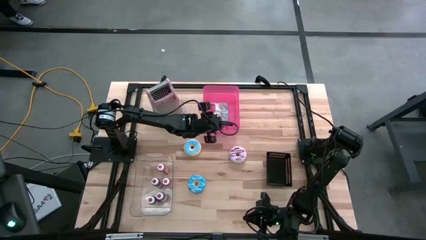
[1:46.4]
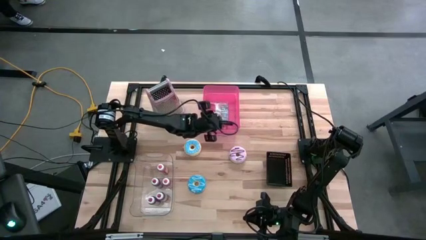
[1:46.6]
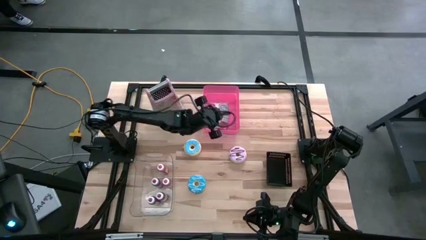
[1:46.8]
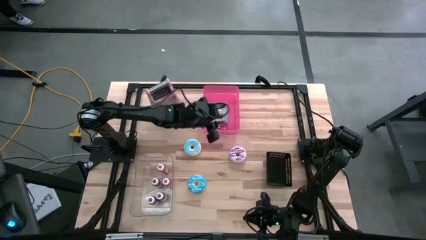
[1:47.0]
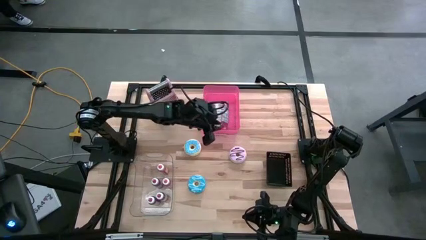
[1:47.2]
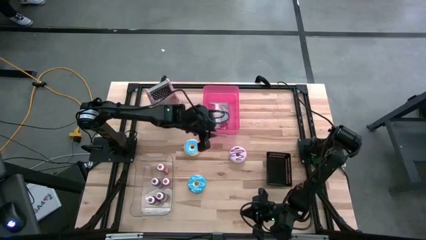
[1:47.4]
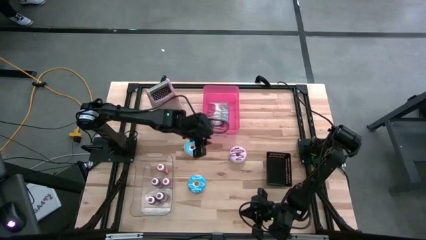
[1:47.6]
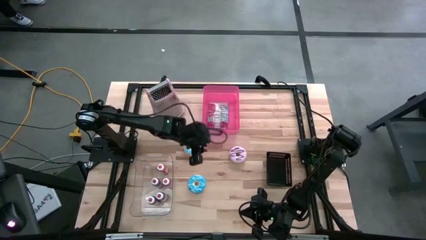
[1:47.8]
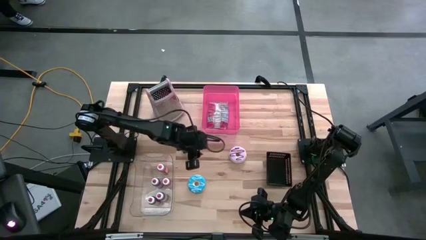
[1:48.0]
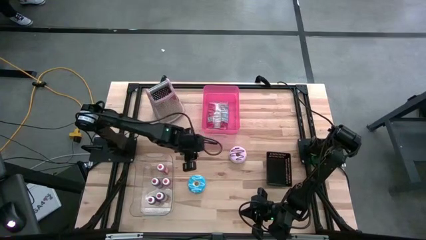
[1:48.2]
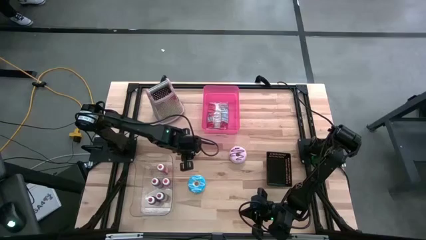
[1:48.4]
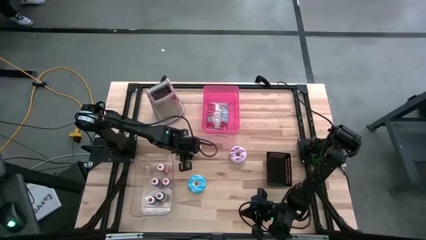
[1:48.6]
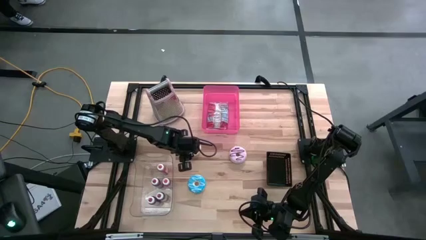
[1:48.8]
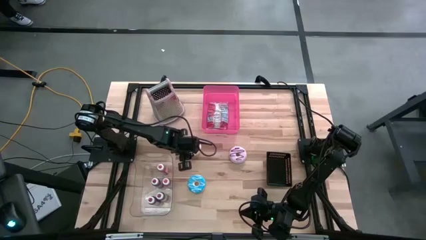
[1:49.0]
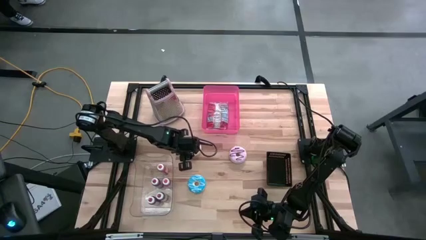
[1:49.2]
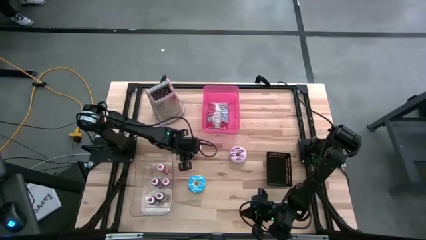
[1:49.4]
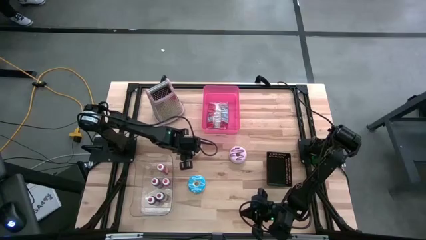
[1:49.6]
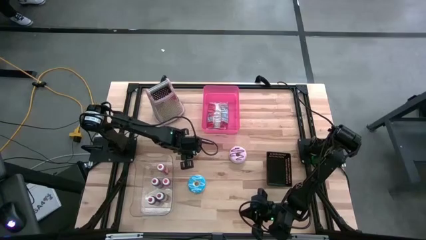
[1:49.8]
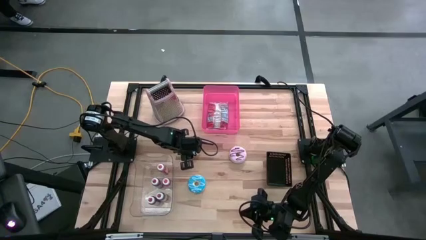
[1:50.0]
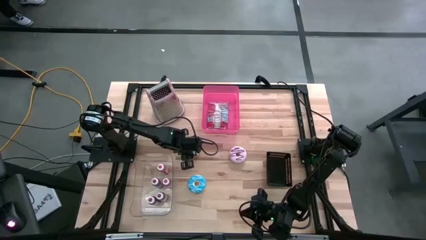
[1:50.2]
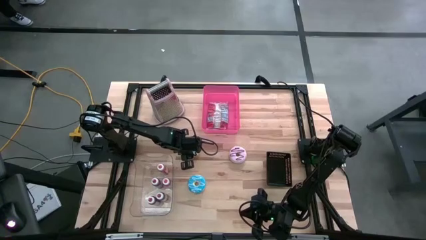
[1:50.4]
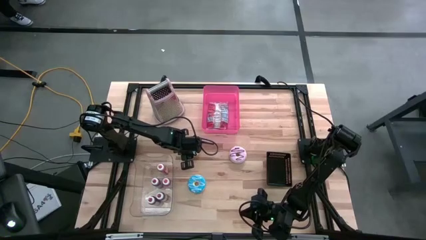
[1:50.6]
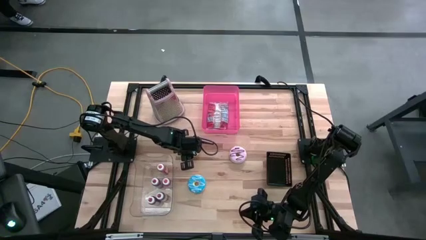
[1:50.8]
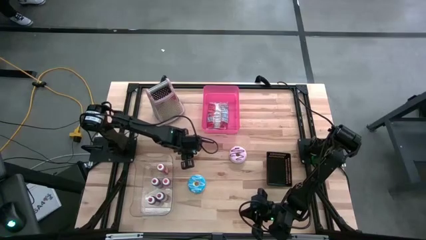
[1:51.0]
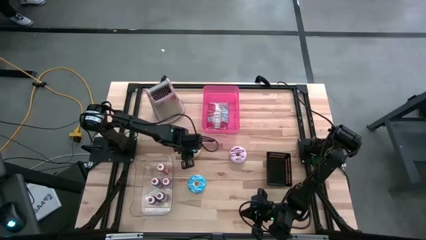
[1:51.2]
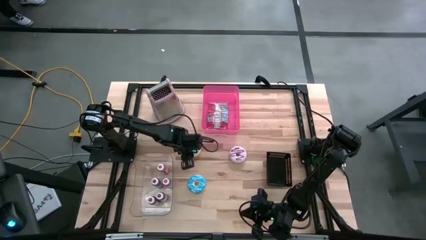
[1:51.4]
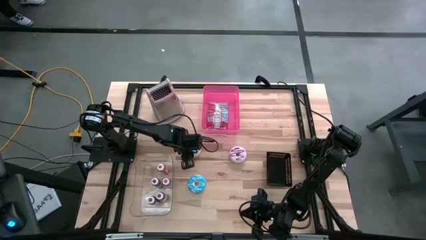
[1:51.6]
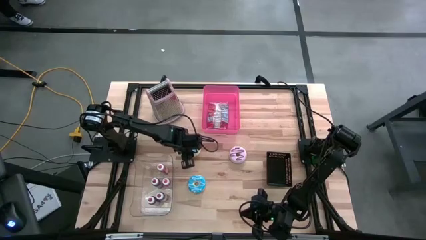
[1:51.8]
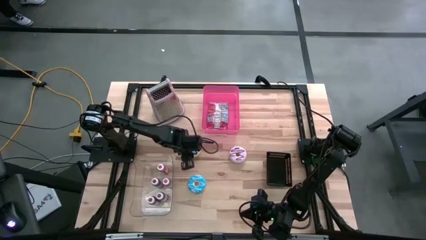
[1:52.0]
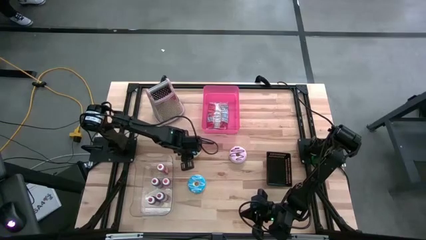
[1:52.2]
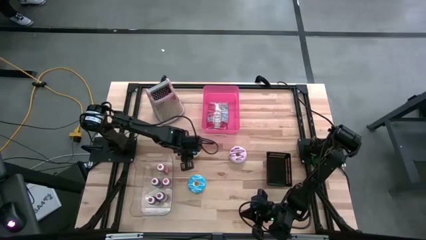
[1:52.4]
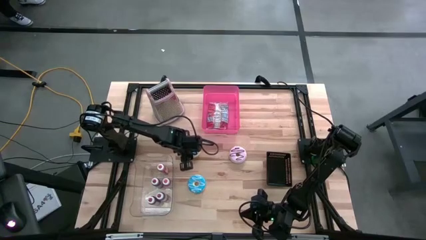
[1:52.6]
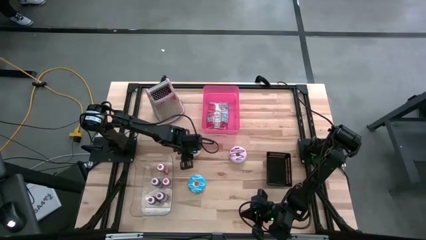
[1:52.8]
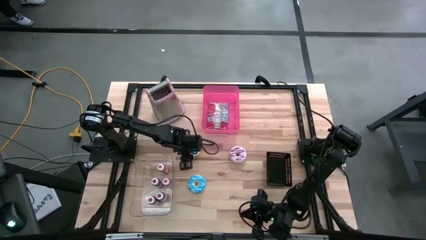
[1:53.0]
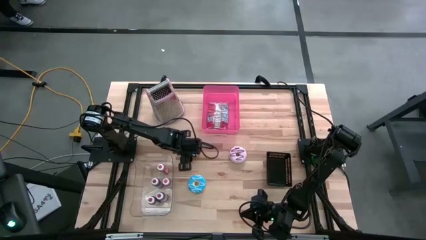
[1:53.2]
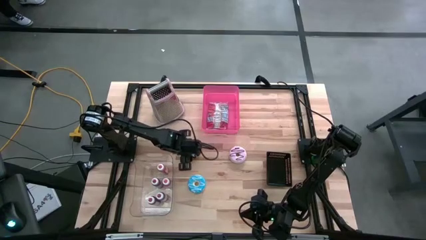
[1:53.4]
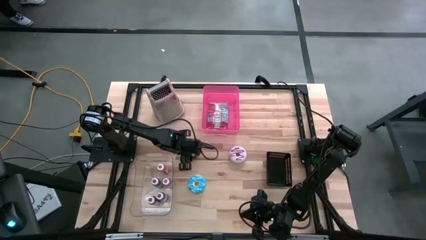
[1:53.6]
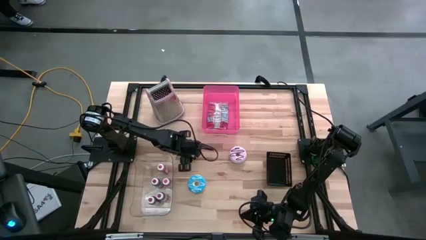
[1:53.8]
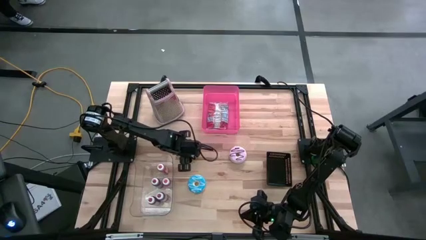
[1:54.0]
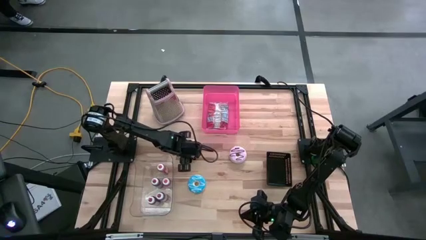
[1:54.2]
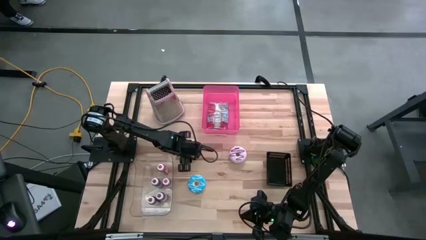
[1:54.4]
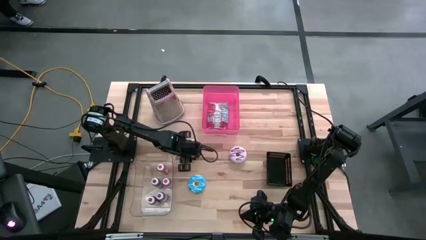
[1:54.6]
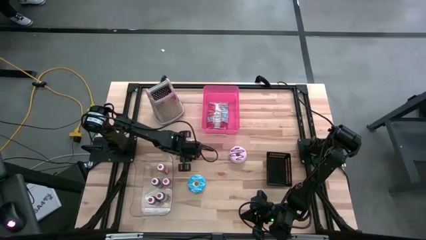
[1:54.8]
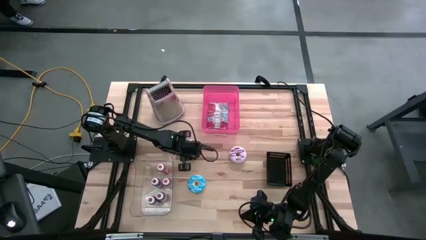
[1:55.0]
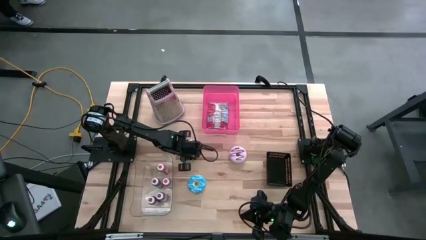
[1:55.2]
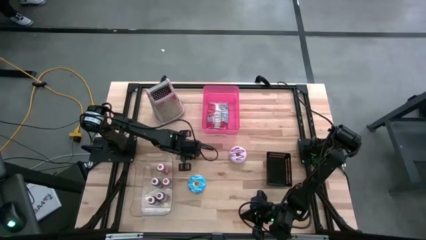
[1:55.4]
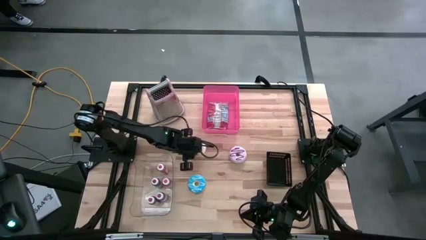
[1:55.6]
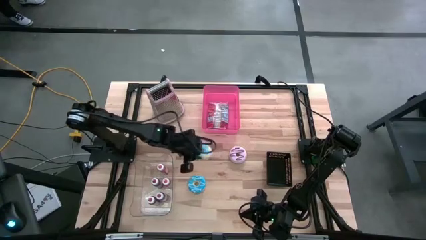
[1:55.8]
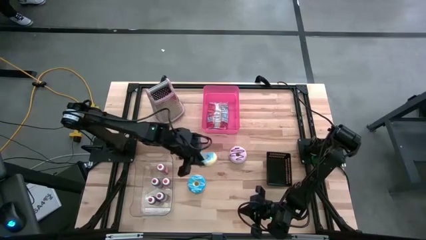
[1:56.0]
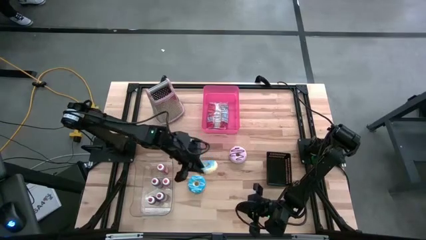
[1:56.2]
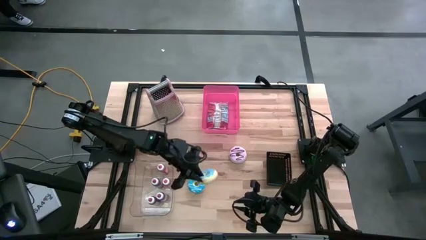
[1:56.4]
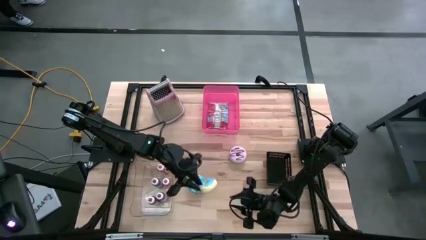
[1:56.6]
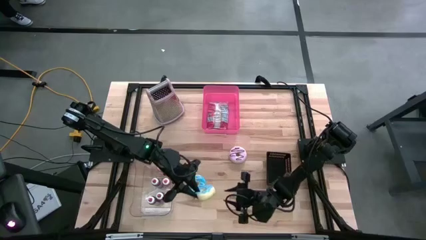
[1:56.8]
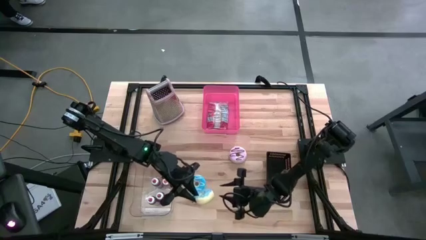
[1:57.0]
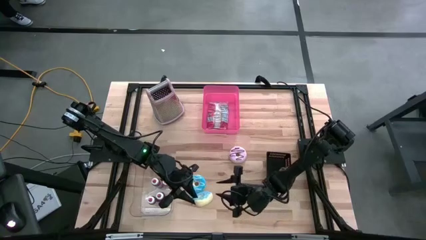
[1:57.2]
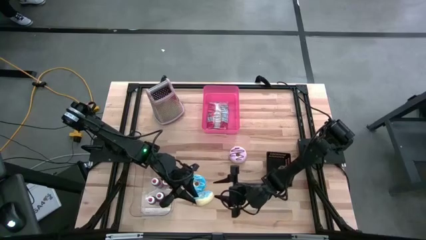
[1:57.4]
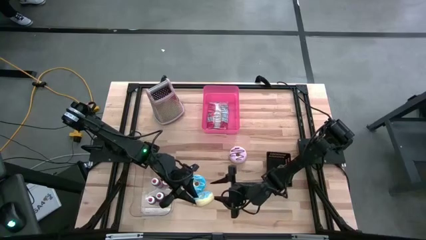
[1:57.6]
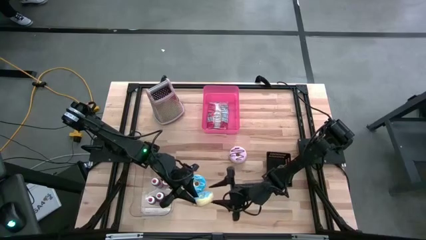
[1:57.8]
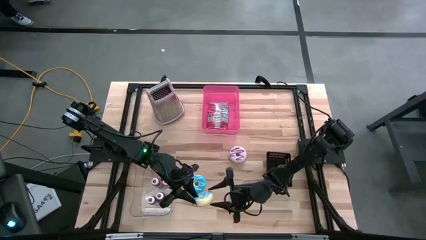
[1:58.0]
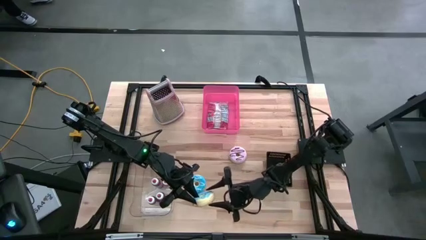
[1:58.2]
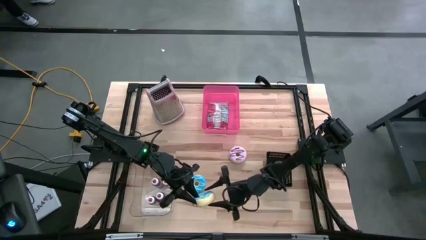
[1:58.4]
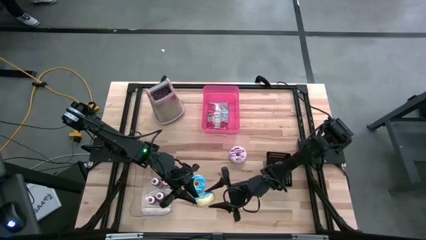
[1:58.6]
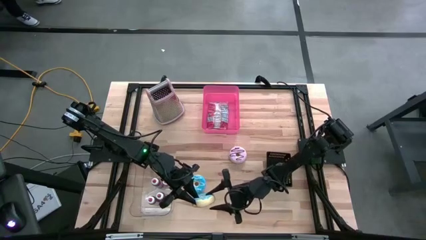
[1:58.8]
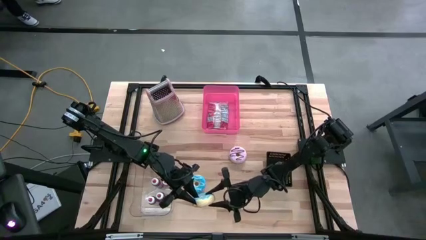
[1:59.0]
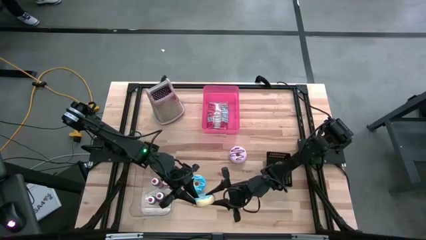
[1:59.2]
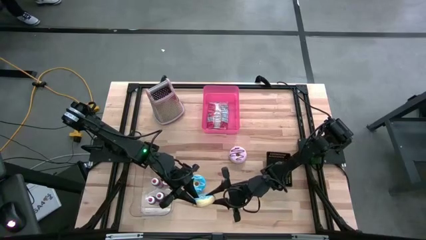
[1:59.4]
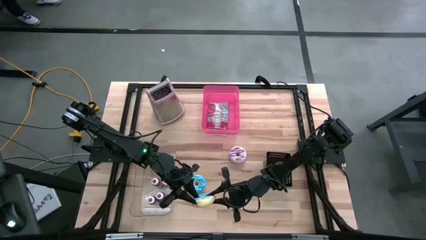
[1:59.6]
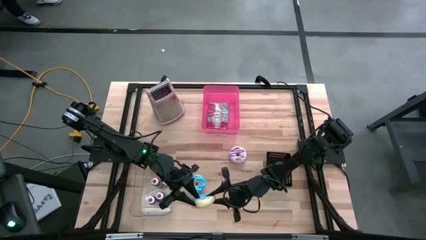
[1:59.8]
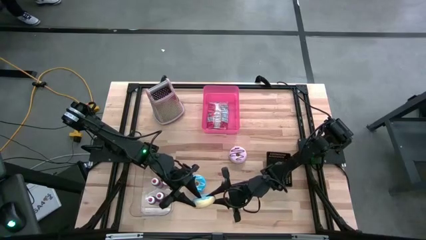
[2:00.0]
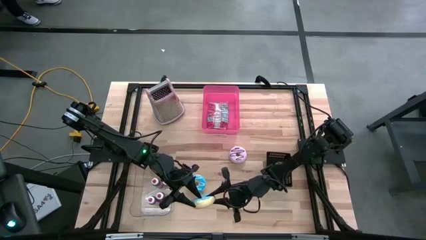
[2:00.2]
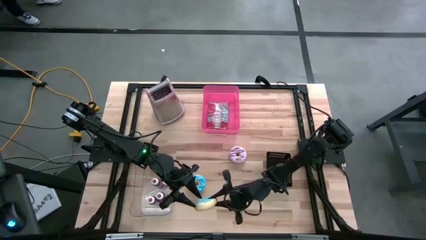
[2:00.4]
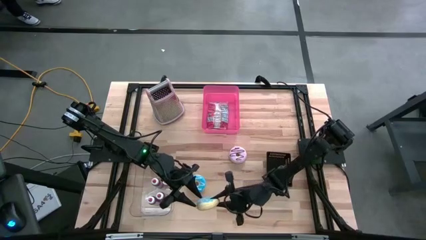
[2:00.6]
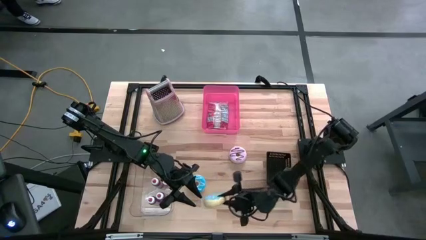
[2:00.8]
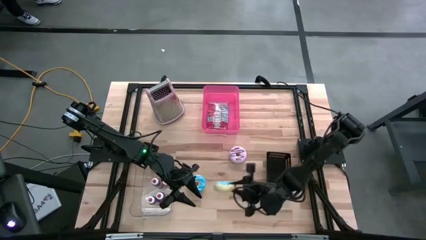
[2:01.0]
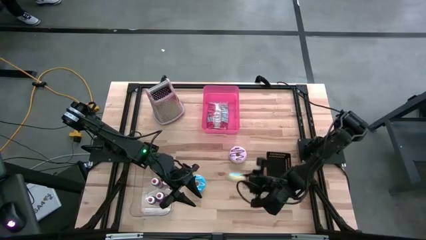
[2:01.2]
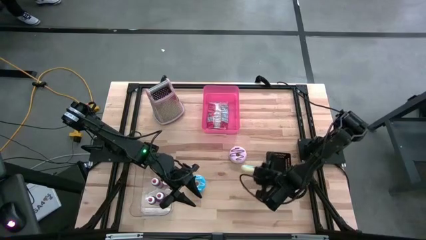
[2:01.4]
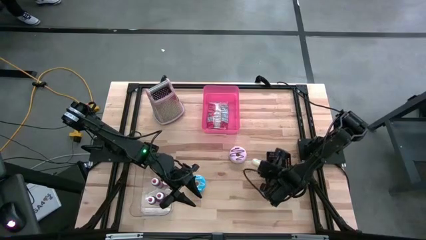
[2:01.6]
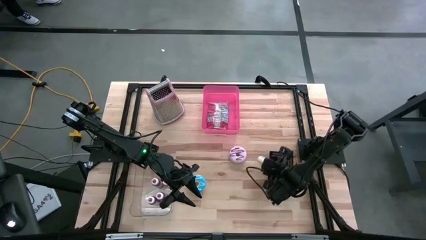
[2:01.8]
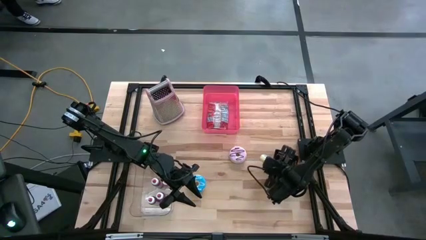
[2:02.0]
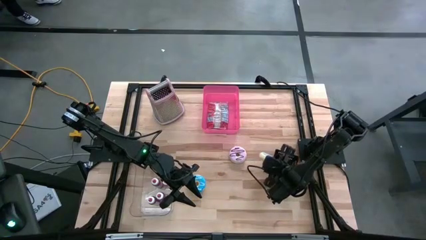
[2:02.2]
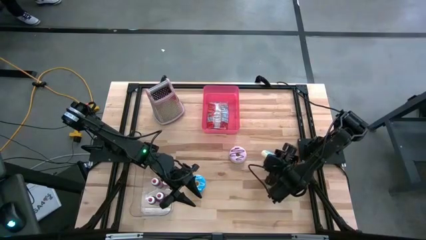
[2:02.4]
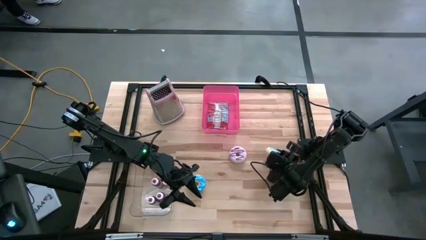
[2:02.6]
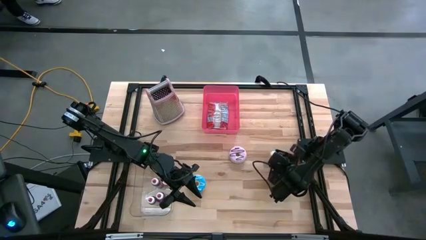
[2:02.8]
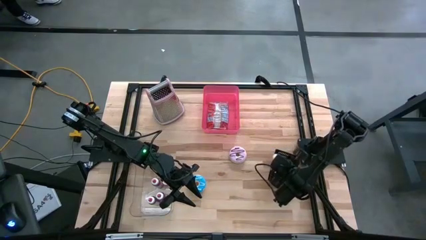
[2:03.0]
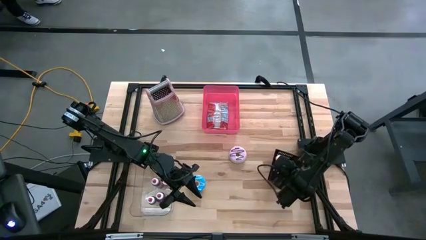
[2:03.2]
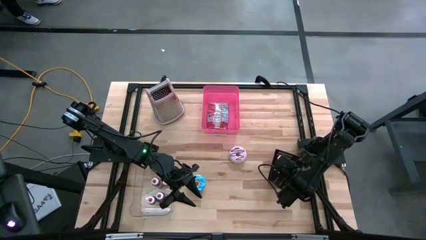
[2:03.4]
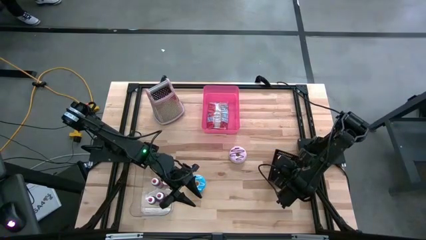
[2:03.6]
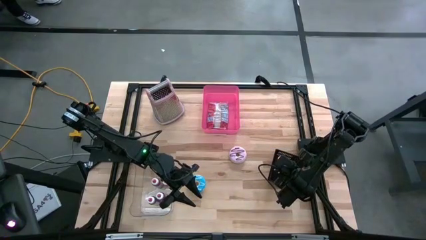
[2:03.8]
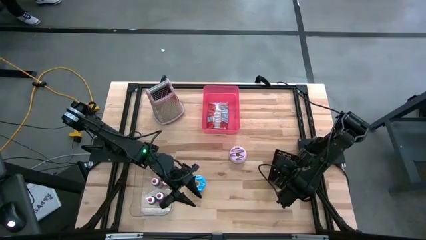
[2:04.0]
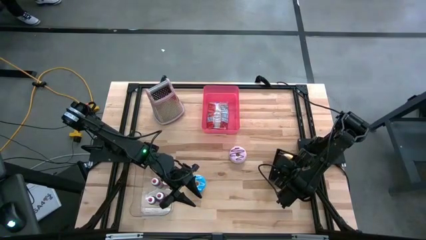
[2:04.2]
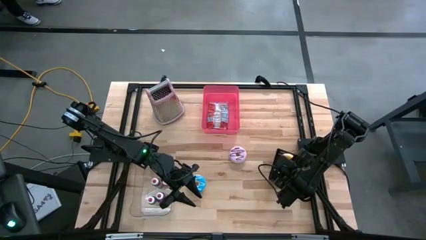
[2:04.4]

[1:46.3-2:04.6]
Put the top left light blue donut into the black bin
